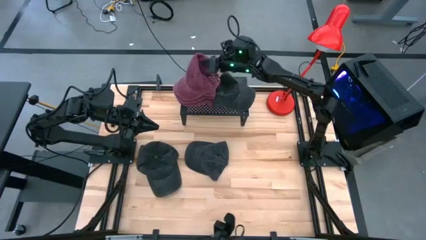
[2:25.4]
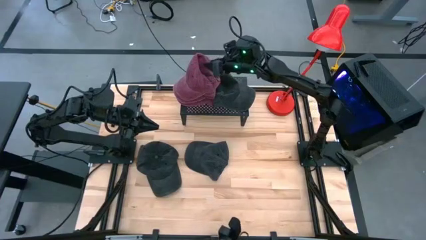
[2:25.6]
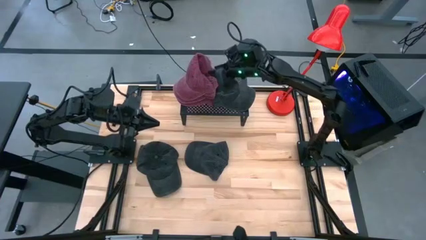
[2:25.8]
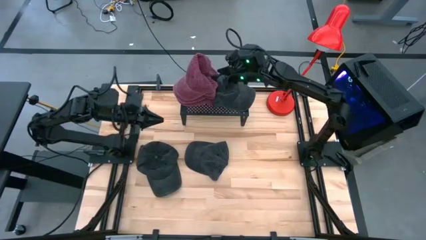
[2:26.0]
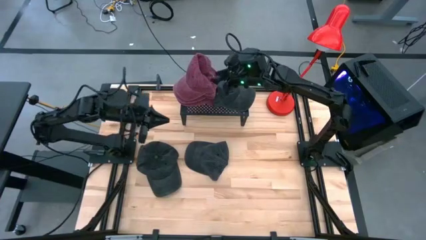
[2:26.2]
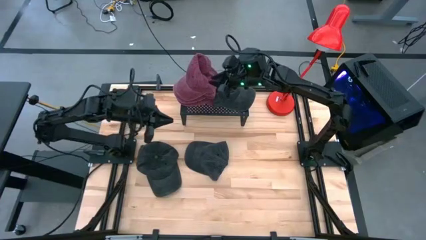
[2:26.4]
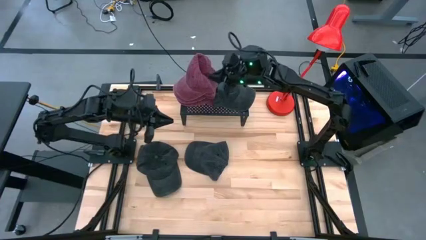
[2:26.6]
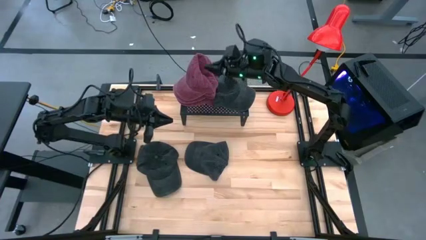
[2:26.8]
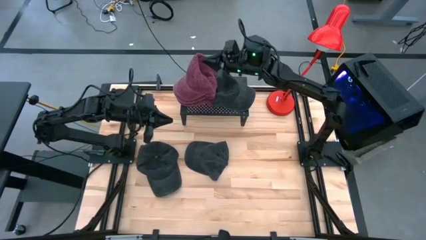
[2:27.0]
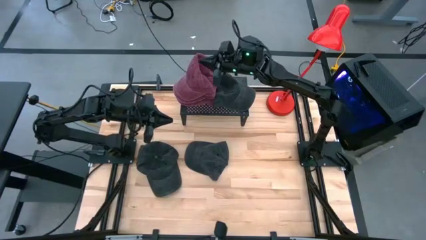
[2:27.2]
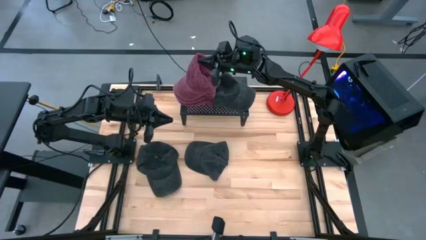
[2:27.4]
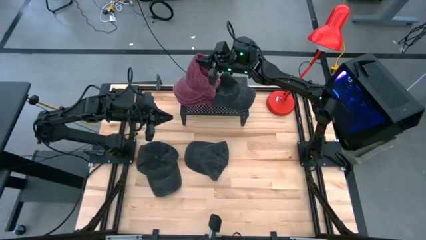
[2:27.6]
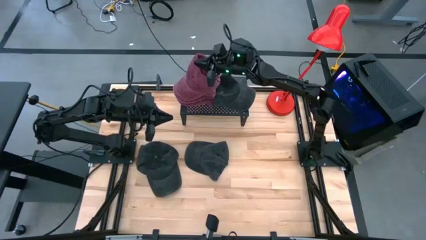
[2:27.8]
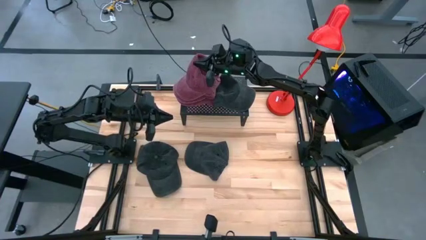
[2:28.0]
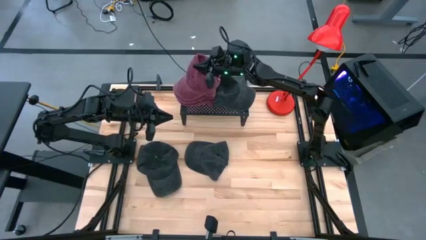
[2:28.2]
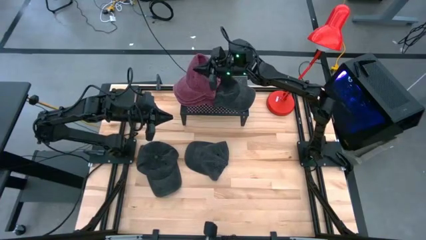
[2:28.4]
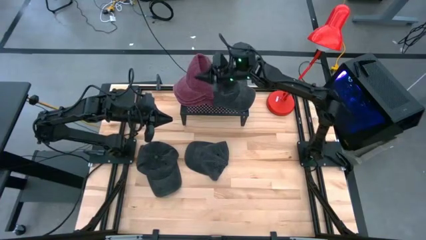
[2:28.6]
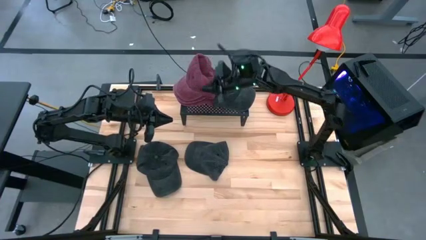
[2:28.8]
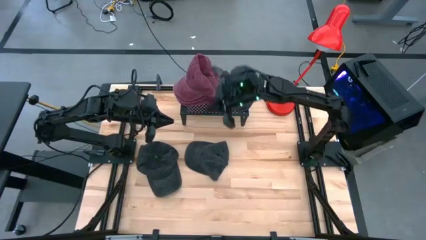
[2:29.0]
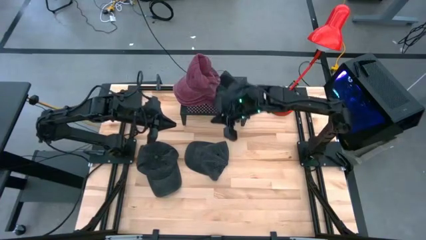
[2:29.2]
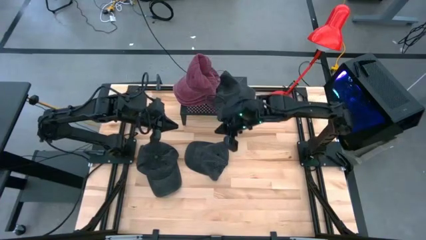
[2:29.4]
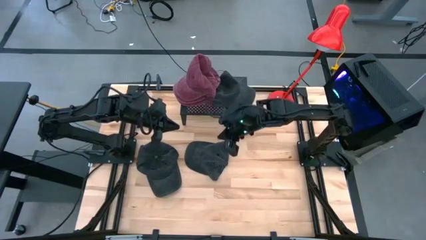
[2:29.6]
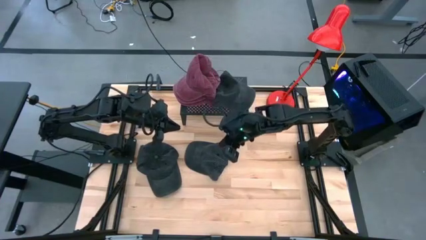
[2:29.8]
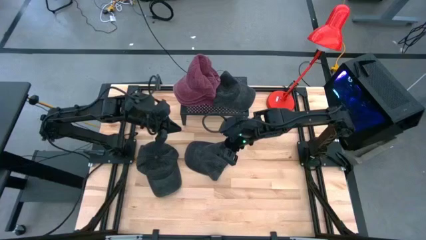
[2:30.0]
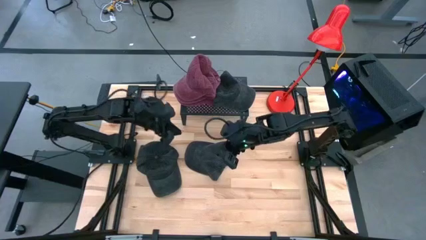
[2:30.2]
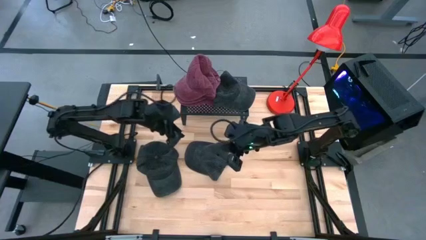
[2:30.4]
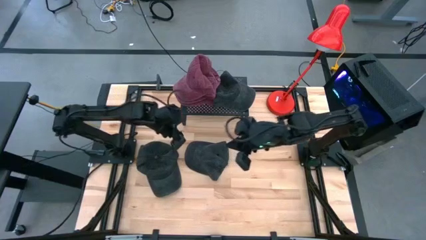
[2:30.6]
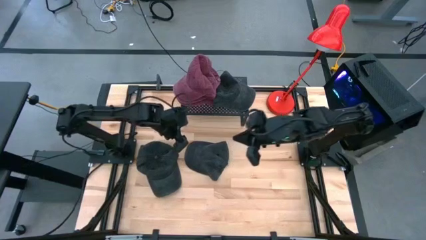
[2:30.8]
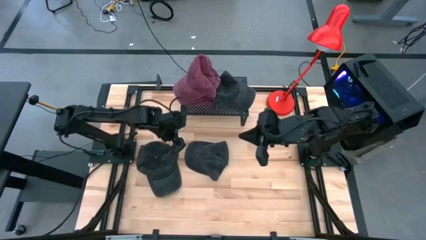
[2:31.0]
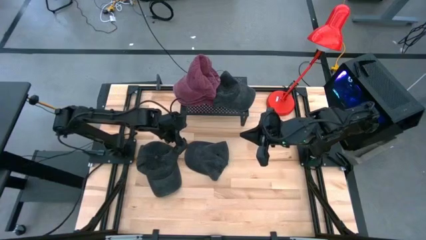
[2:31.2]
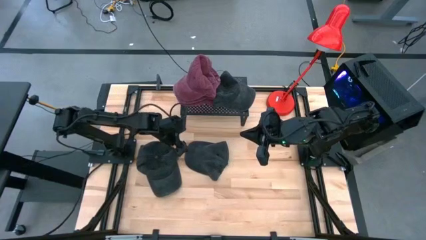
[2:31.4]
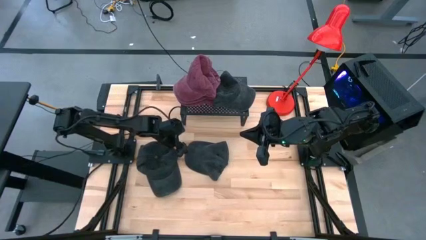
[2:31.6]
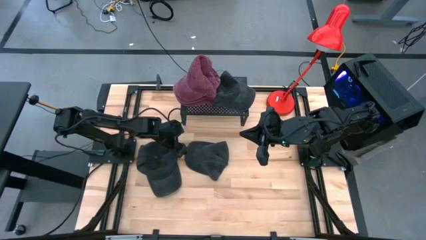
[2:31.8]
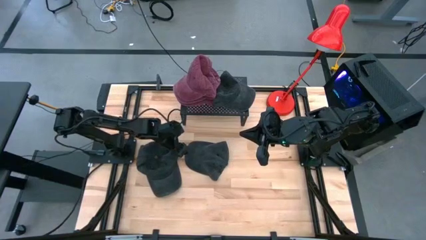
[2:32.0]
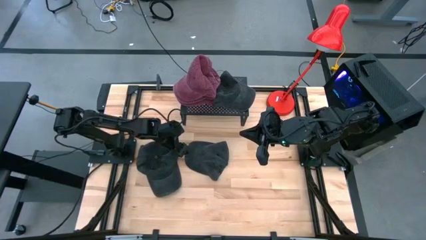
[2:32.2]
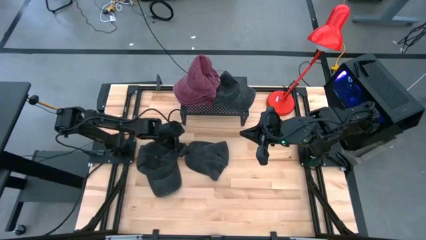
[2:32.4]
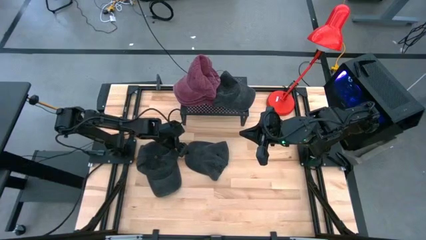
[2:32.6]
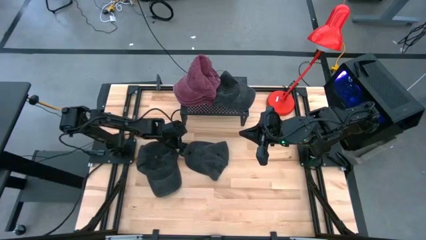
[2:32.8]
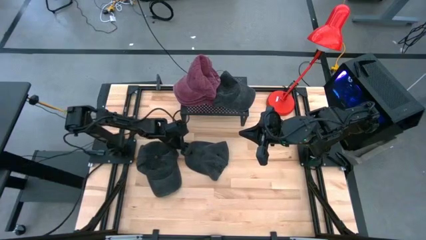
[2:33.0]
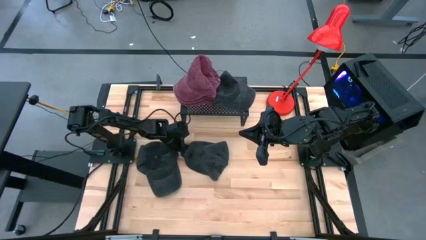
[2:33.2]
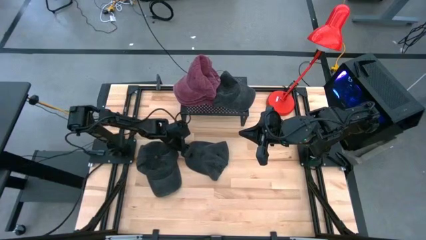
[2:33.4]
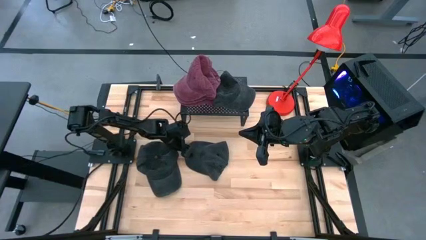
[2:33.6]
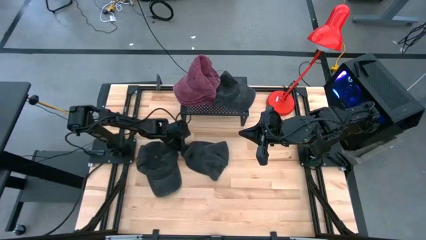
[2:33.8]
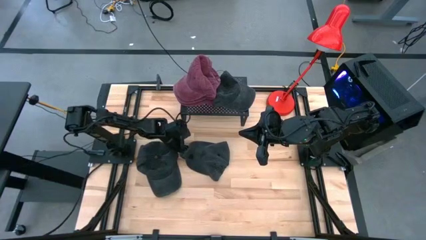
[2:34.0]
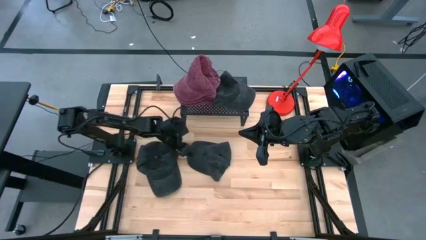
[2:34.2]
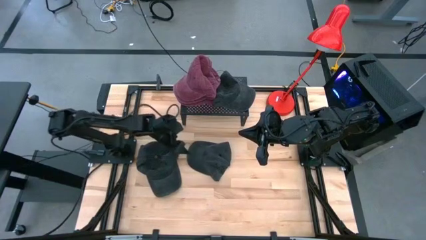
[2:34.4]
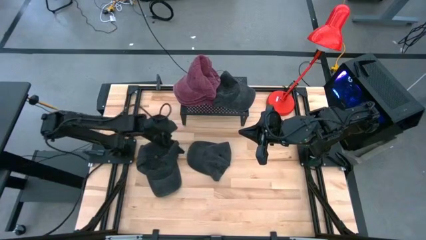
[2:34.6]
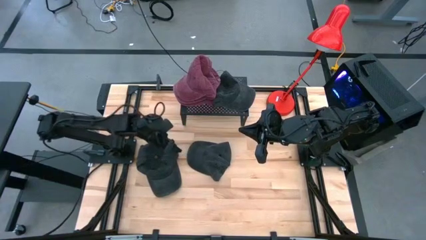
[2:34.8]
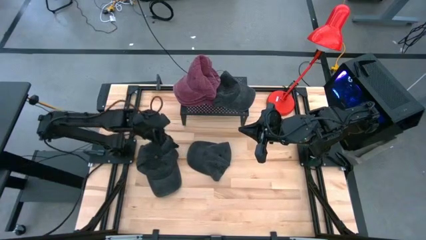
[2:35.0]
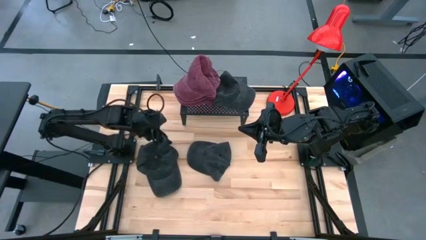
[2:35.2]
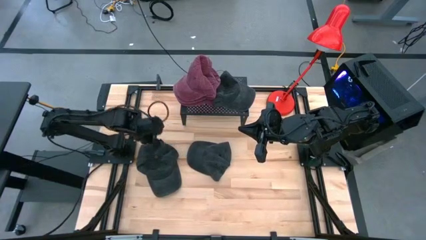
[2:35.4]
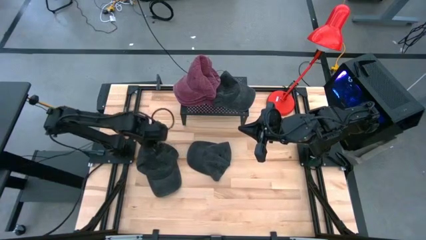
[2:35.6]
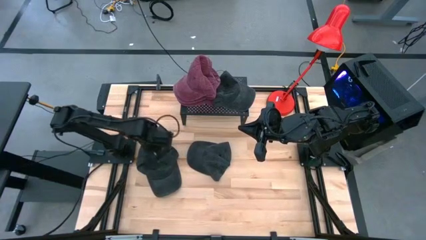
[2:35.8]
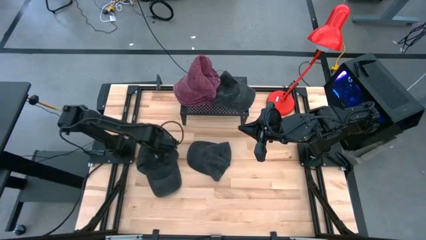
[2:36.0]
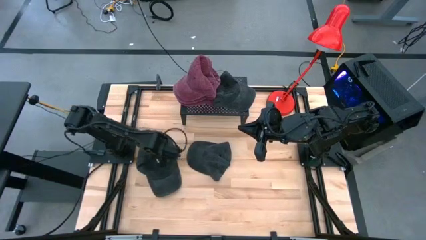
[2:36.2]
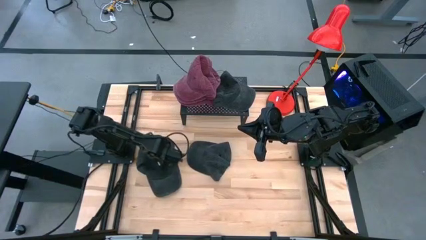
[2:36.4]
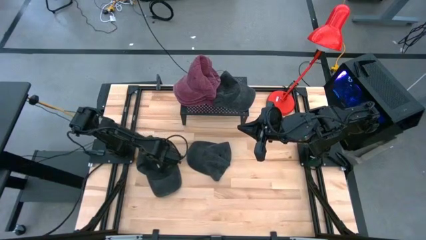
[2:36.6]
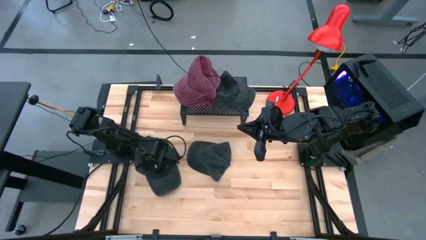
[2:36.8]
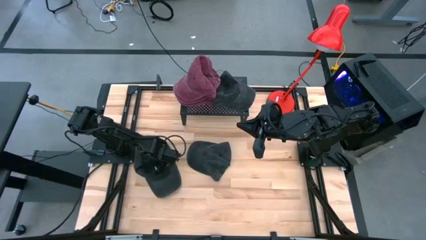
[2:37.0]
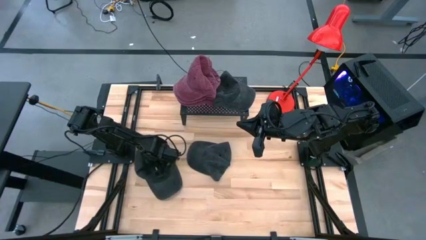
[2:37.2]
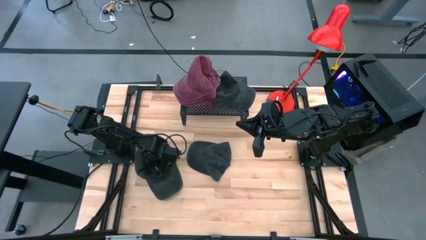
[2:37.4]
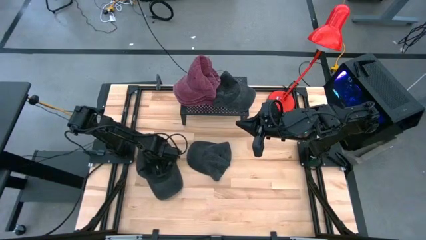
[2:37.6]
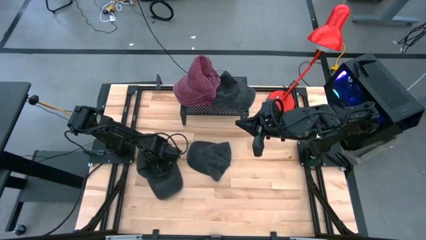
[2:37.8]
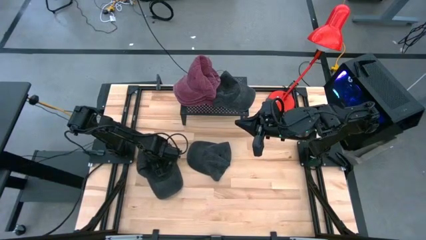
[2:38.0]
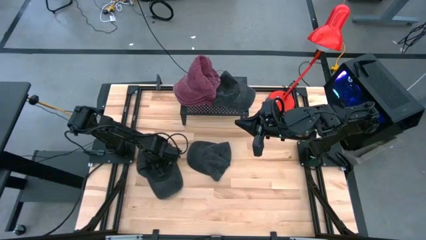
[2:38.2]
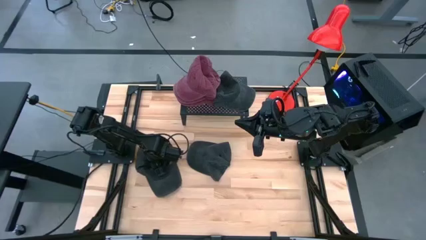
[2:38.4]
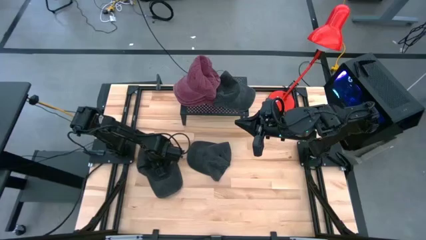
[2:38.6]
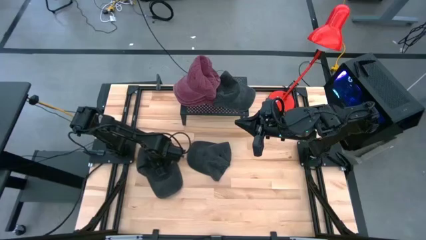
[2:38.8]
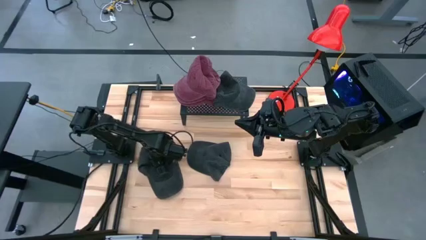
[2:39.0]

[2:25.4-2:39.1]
Task: Pick & Place hat
Put the left black cap on top of the black cap on the shelf

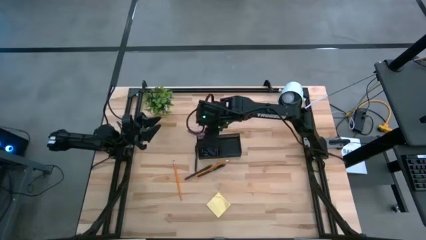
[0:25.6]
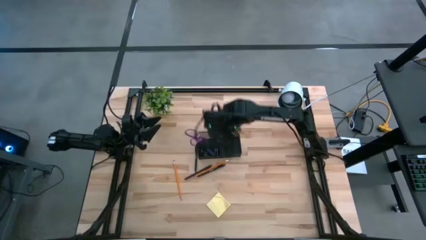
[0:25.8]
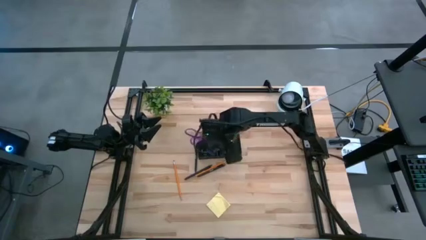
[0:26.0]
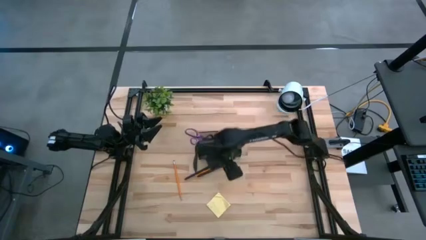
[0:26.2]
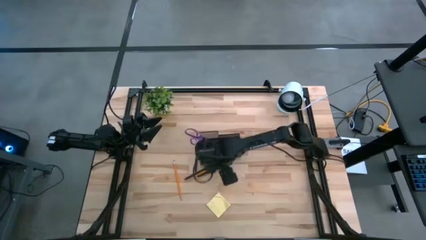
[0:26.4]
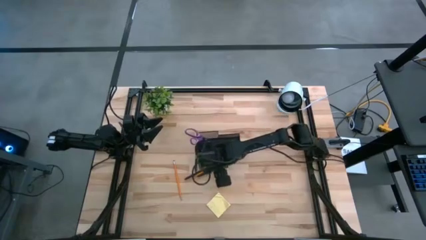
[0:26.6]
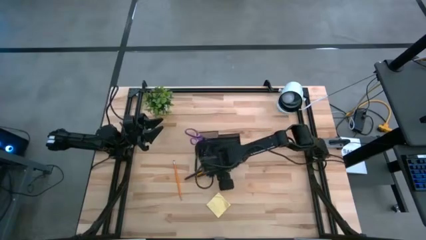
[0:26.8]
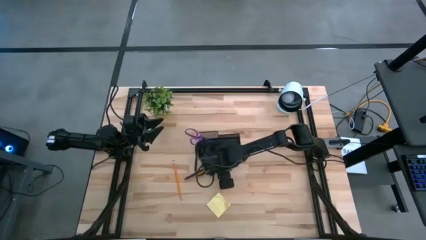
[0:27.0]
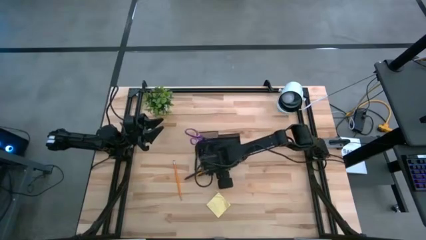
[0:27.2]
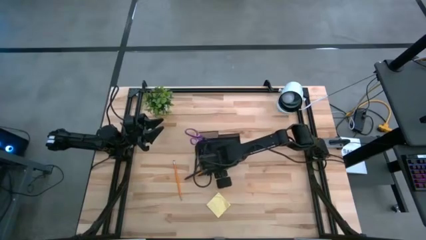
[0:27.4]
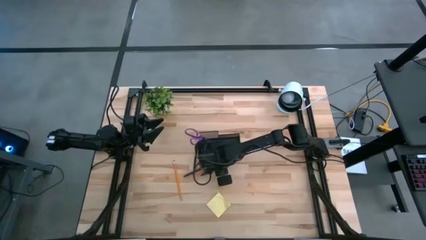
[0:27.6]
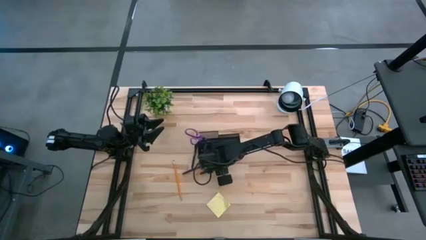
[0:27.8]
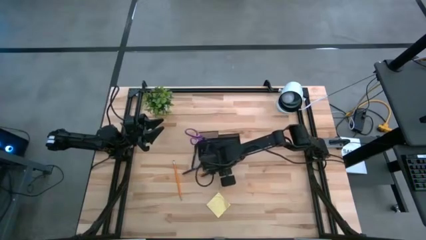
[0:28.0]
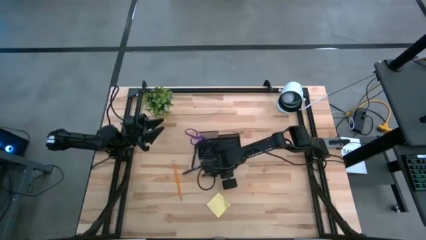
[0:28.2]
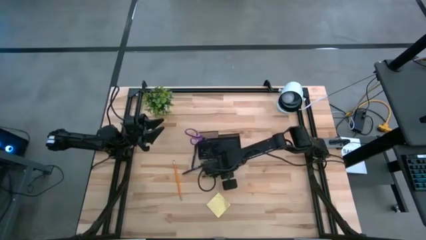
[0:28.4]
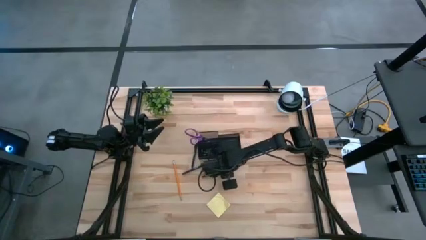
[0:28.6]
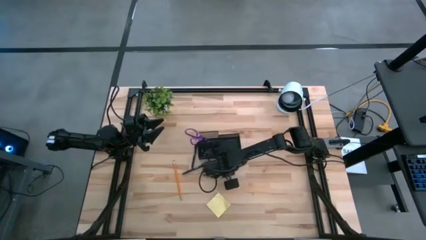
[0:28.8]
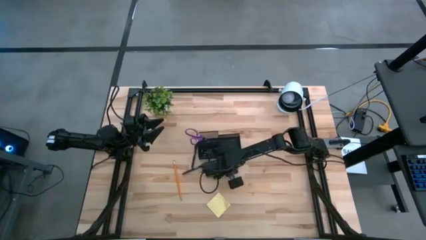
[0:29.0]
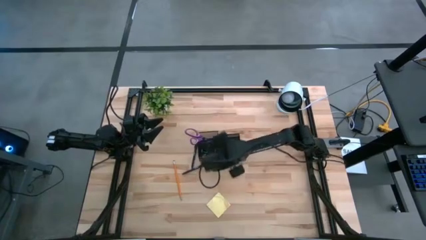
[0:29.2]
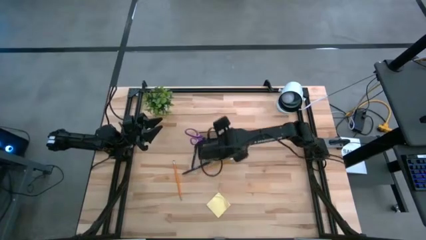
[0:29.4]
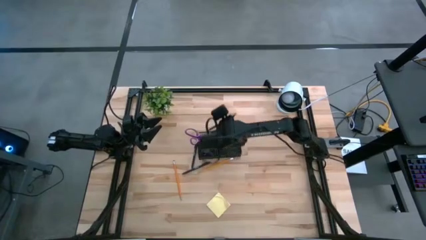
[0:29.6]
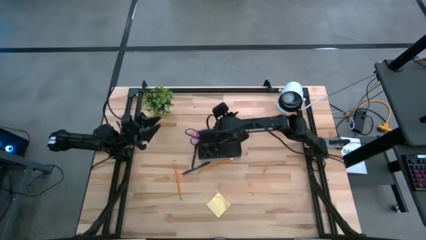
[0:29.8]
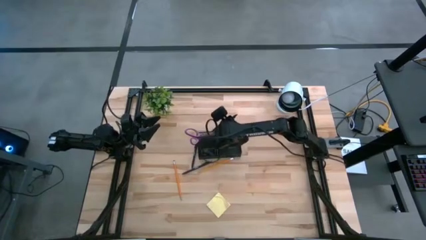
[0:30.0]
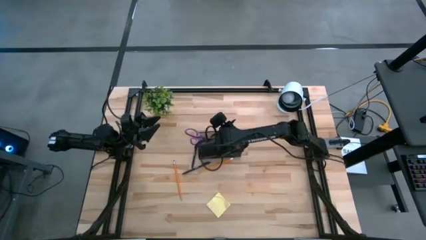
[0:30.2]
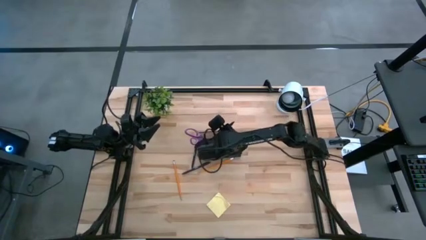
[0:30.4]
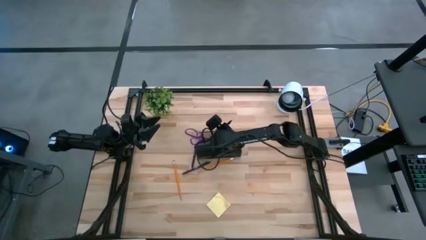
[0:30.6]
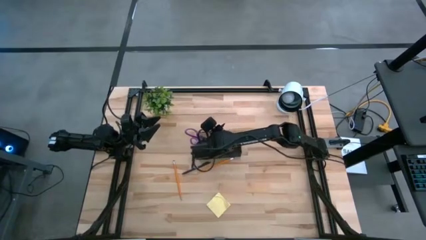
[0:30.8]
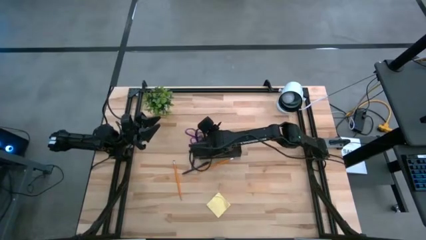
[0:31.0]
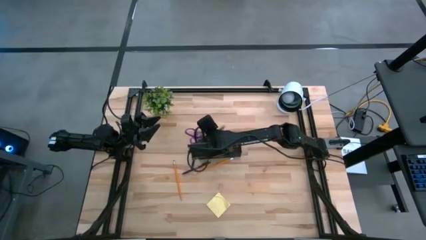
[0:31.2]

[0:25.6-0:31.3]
Task: Pick and place office supplies into organizer
Put the right black pen into the black desk organizer
